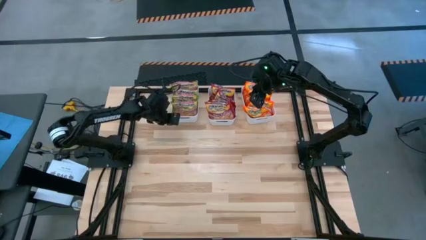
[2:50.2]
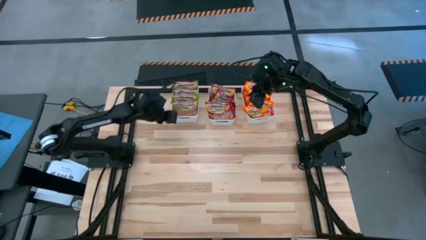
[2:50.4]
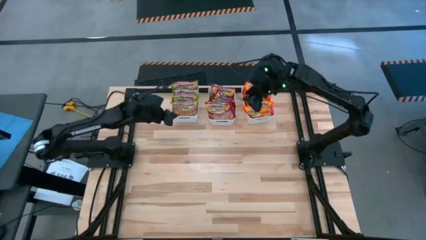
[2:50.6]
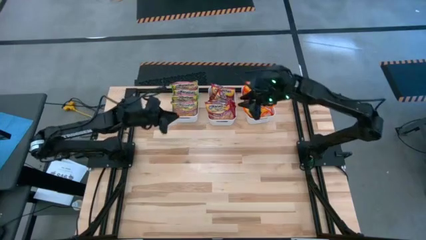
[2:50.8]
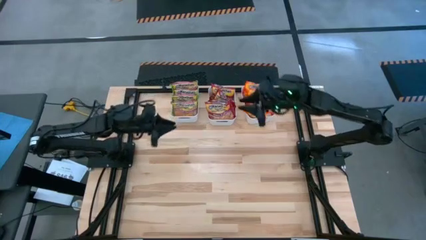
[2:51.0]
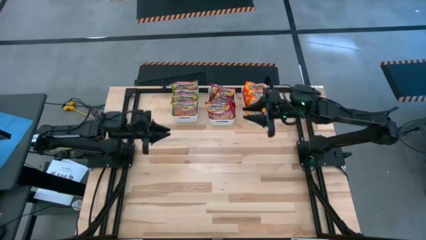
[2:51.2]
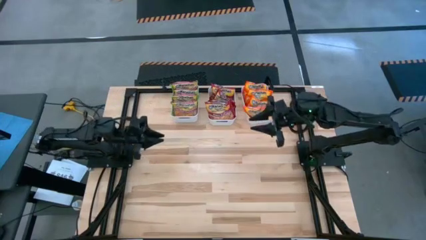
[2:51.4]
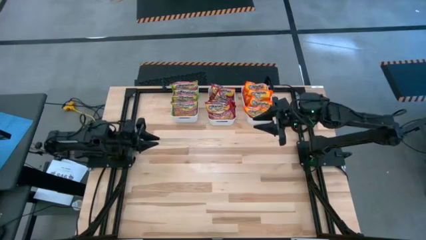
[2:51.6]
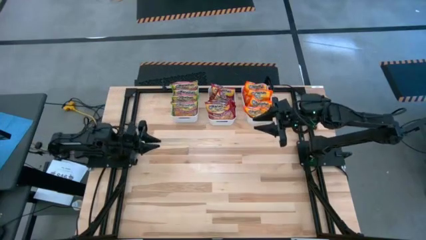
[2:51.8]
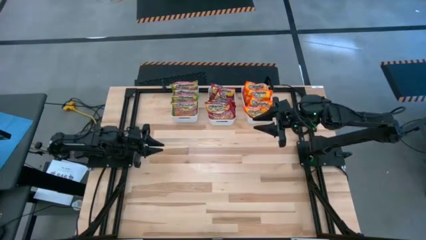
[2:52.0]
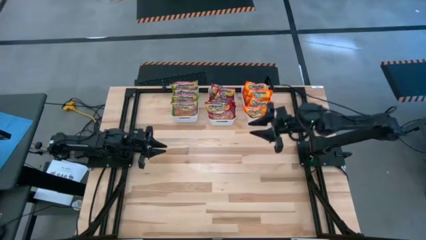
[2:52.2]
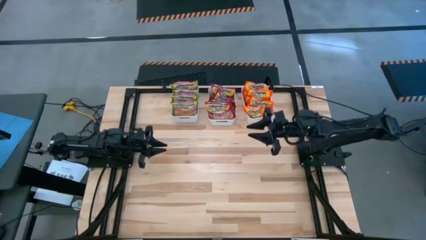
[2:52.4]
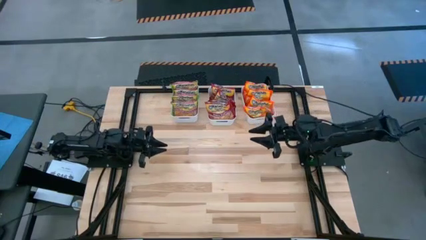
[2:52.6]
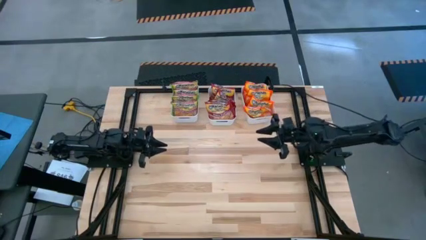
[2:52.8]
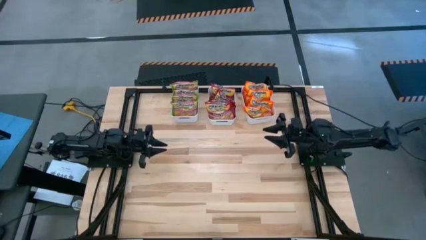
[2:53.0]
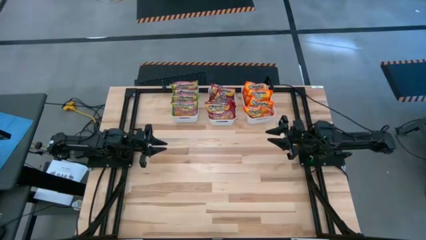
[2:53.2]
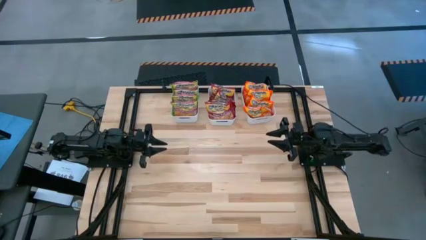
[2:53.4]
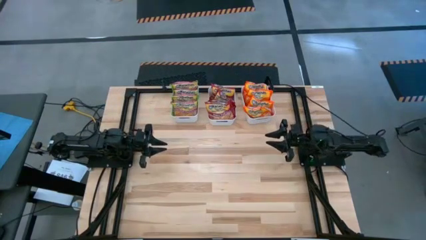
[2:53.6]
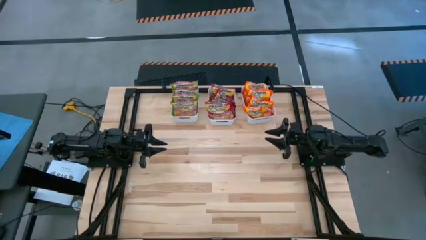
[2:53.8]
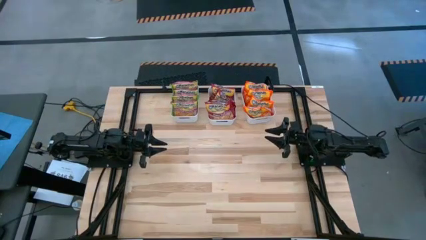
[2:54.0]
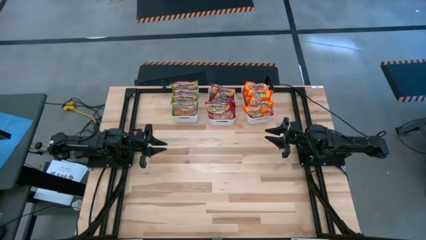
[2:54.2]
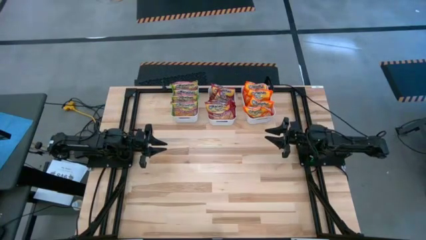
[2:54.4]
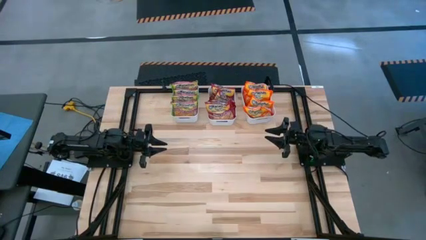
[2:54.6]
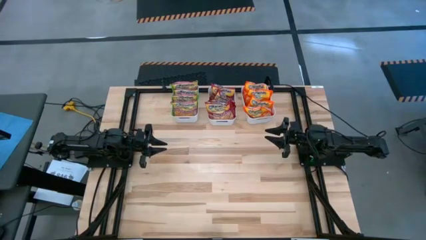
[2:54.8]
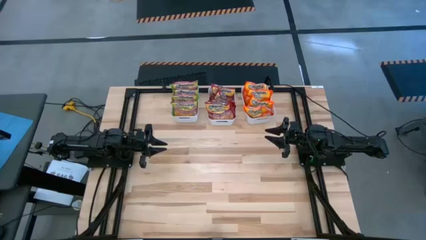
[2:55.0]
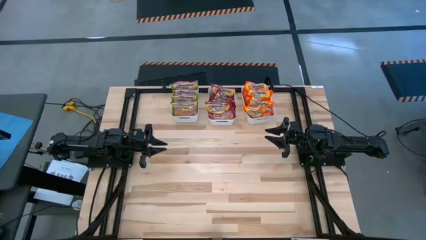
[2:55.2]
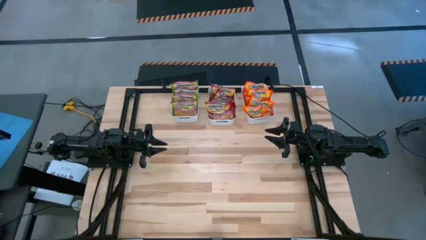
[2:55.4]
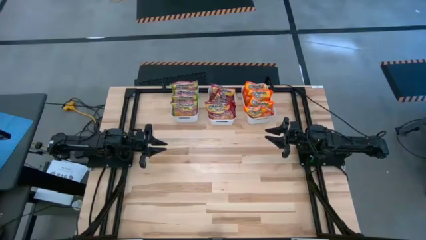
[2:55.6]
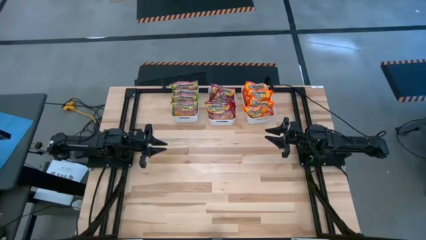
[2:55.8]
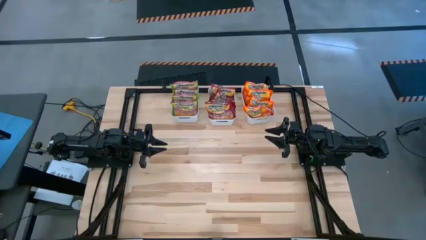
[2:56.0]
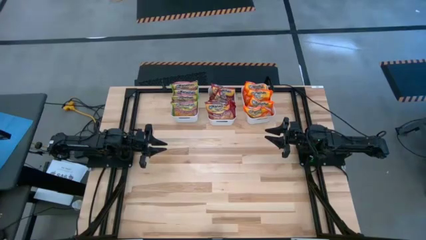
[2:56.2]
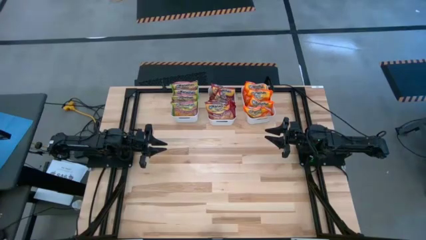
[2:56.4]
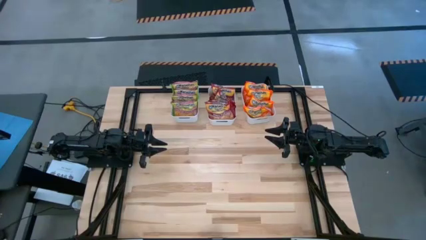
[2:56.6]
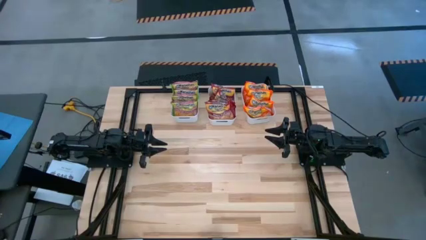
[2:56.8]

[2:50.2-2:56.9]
Task: Sort Maruchan noodles
Return to Home Position

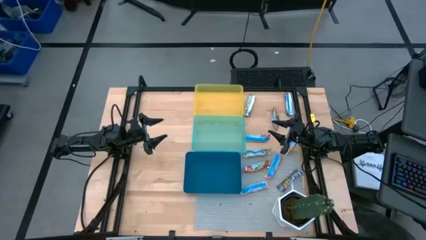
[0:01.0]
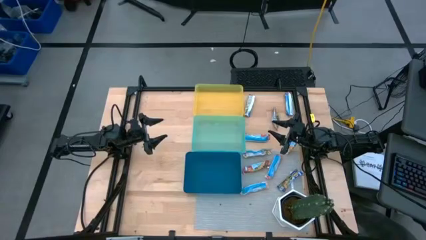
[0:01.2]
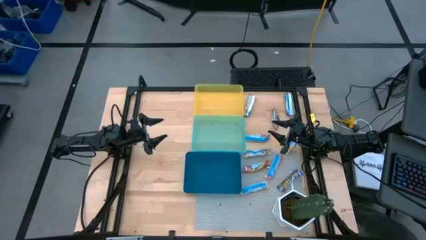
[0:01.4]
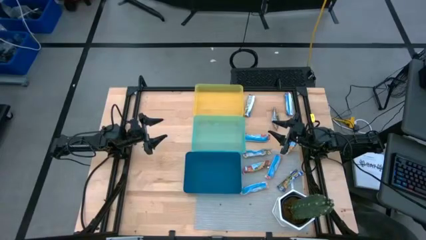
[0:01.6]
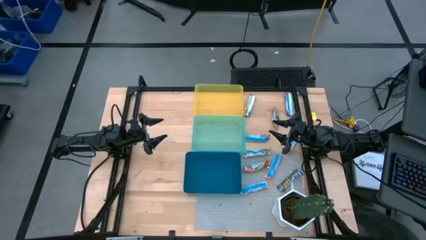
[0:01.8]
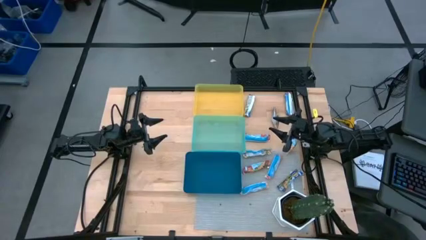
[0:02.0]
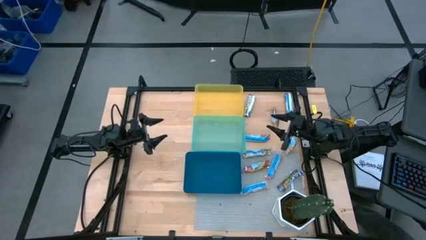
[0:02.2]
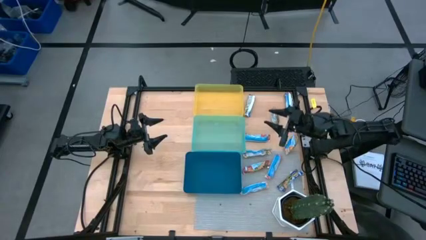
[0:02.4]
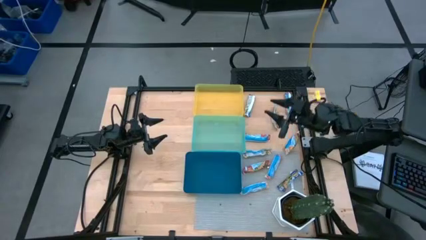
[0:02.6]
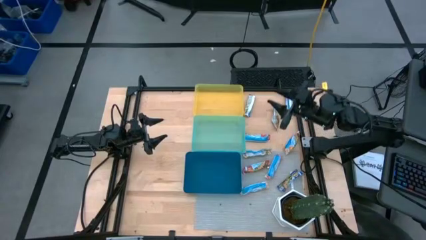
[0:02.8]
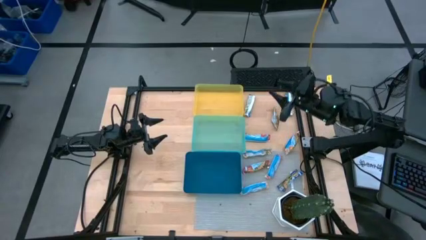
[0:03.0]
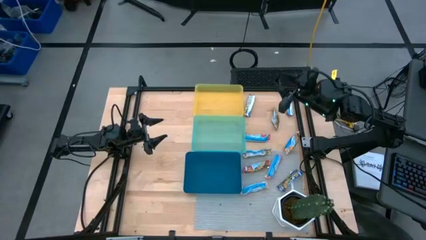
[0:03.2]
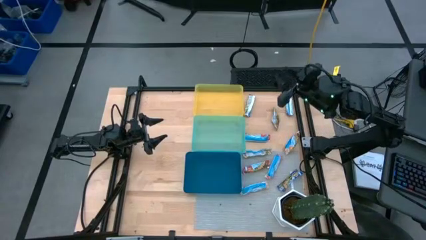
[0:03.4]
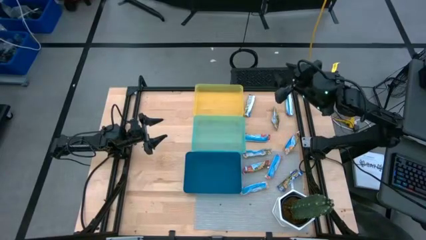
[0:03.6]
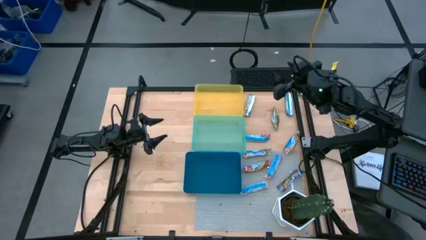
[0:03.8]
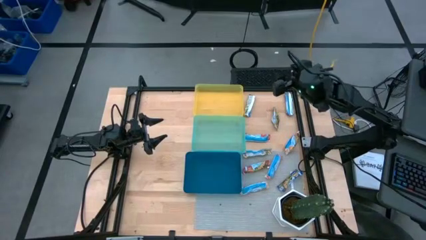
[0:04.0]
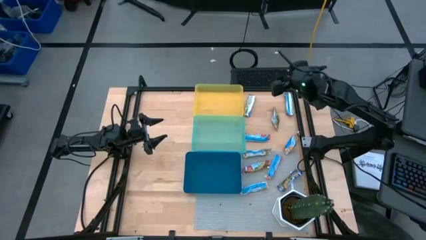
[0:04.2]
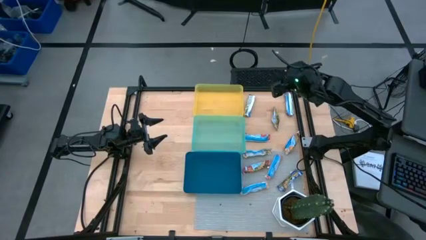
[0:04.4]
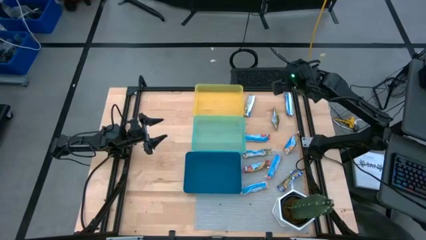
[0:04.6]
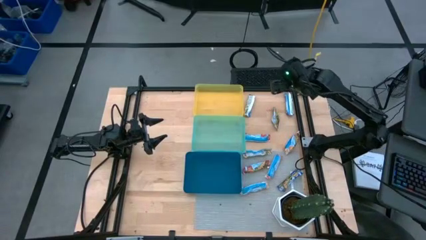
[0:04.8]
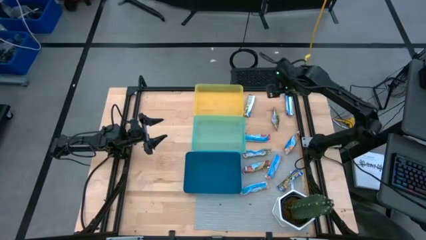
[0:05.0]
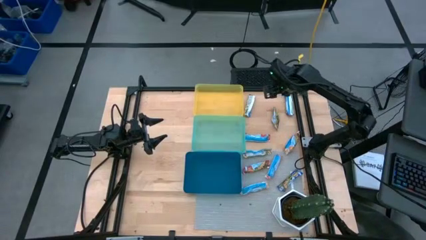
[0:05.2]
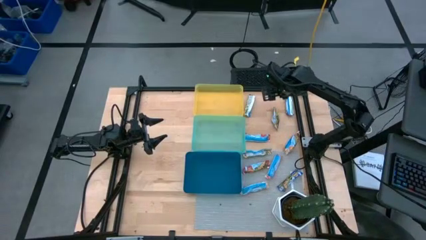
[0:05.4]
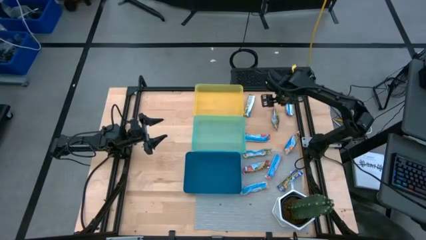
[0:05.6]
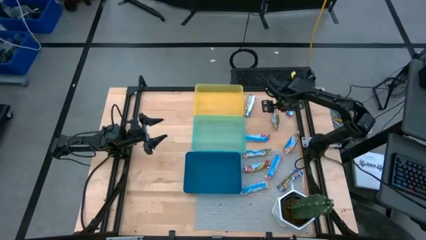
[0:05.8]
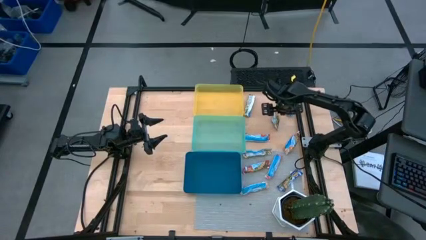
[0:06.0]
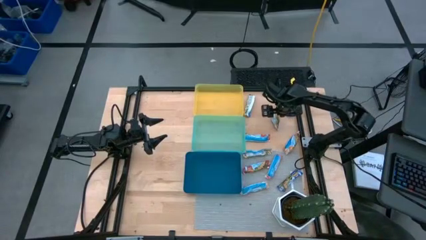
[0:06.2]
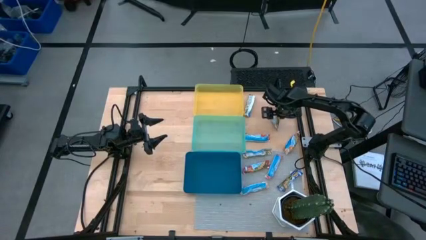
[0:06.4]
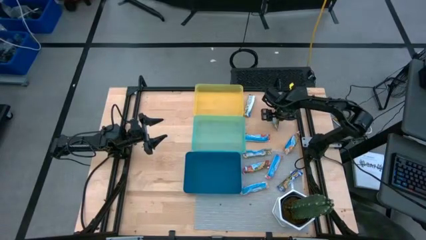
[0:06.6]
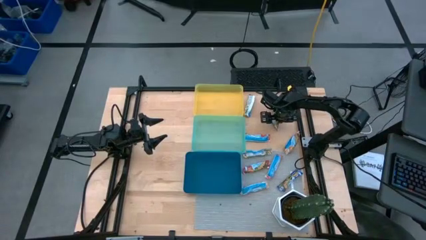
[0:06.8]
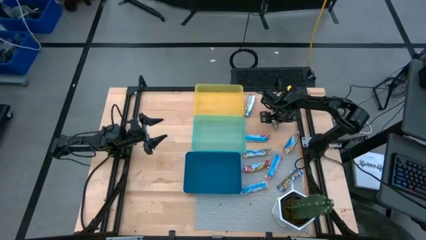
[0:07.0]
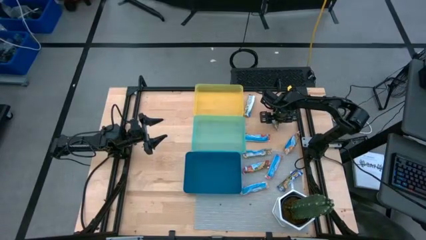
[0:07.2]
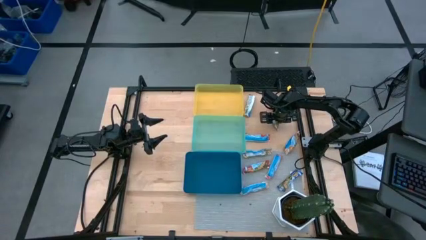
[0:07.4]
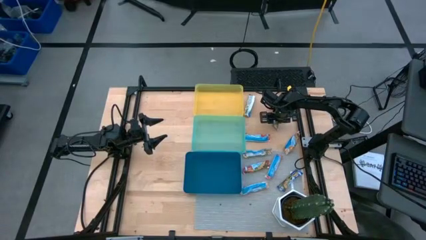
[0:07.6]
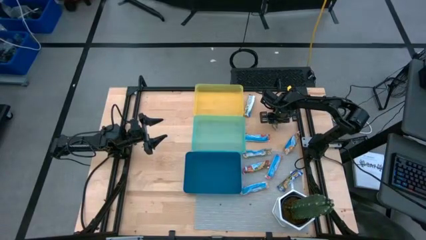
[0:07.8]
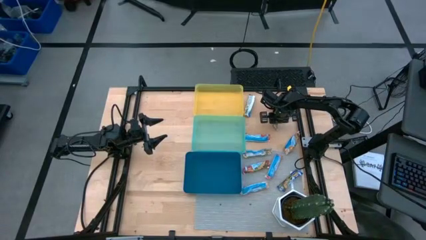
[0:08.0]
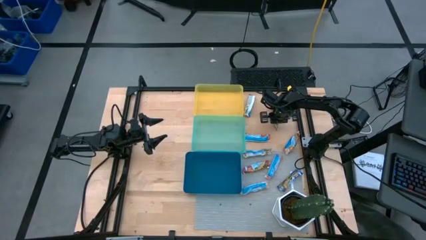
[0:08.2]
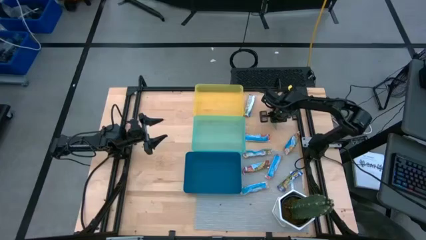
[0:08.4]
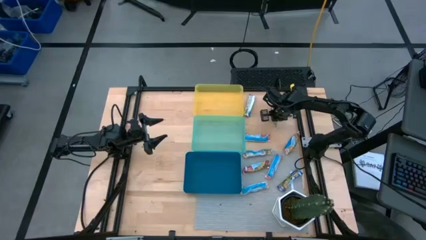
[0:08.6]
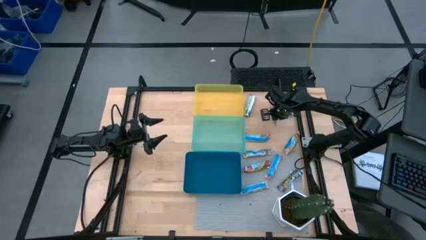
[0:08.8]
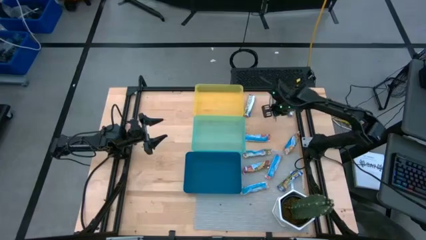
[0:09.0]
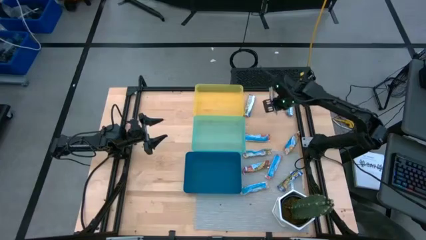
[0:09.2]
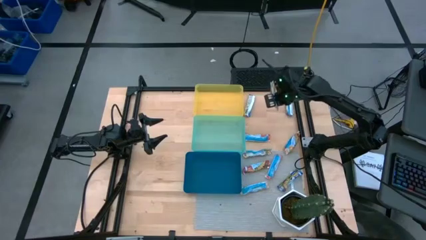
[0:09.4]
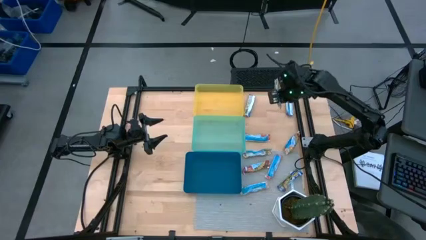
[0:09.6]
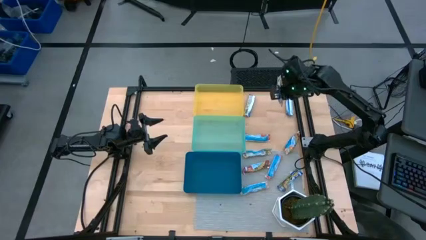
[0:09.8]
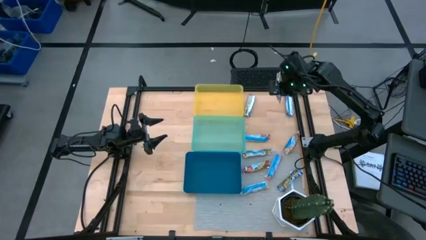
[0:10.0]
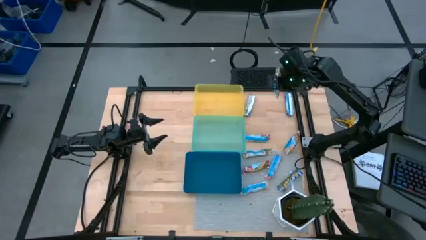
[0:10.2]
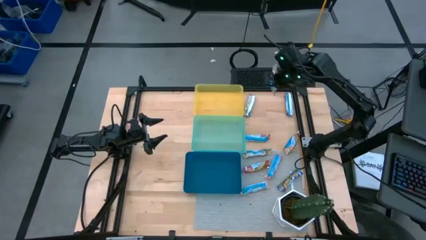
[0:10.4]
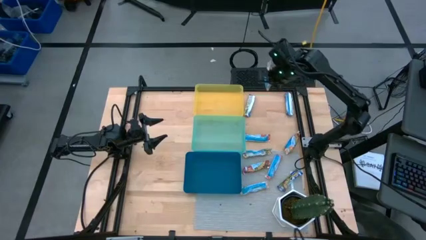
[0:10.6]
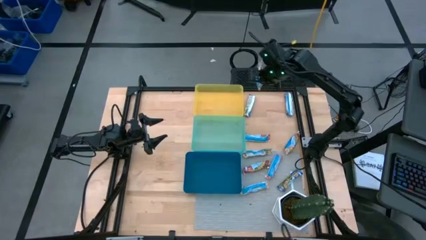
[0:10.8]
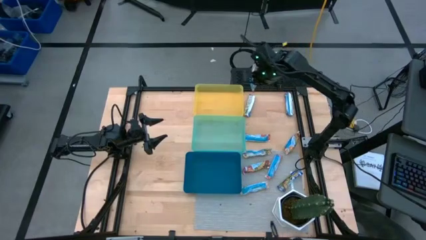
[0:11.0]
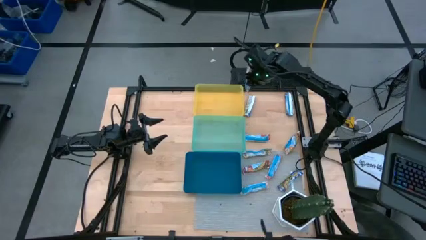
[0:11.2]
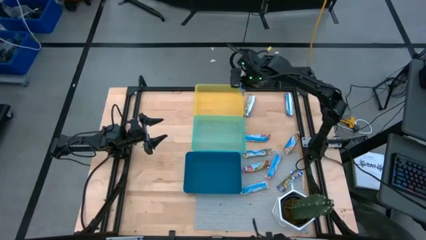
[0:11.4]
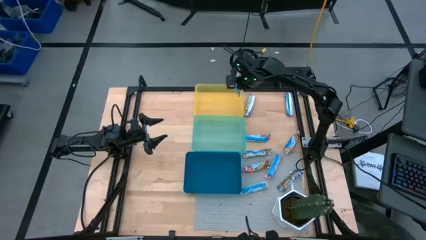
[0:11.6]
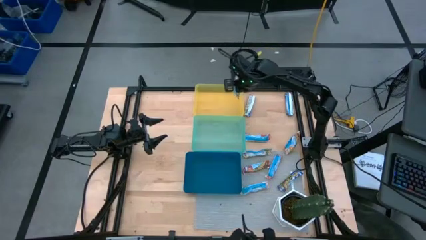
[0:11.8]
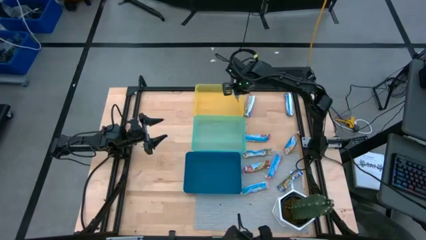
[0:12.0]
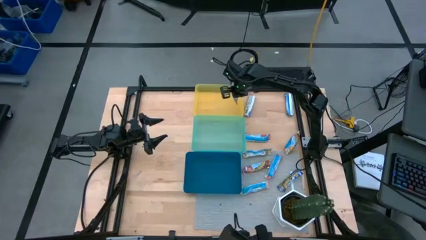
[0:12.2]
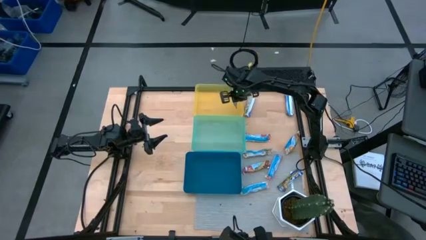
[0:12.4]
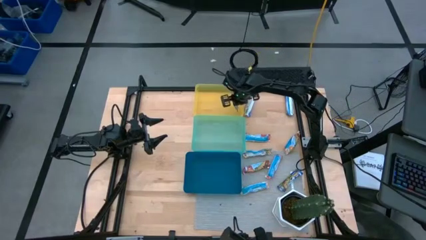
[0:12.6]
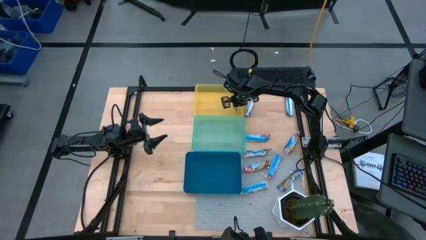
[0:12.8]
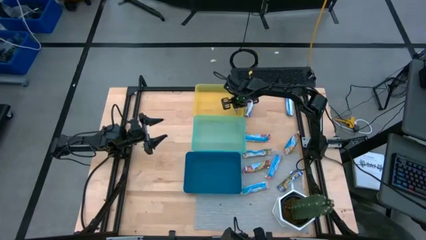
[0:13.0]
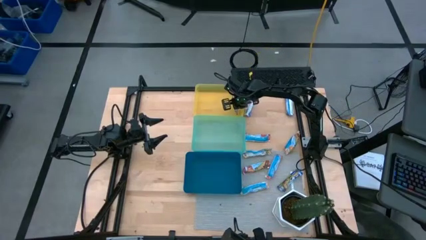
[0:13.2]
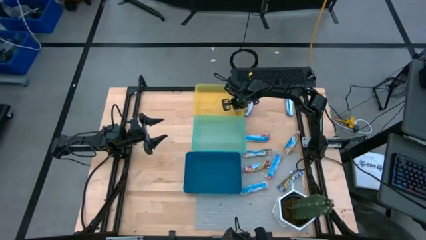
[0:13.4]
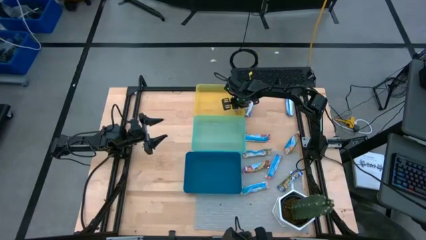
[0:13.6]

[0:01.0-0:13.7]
Task: Pick and place Granola Bars by type
Put the yellow granola bar into the yellow bin
